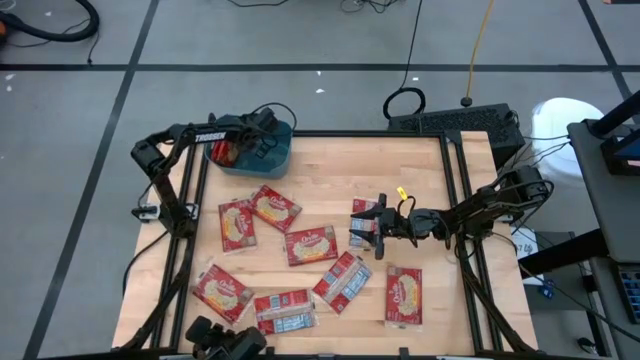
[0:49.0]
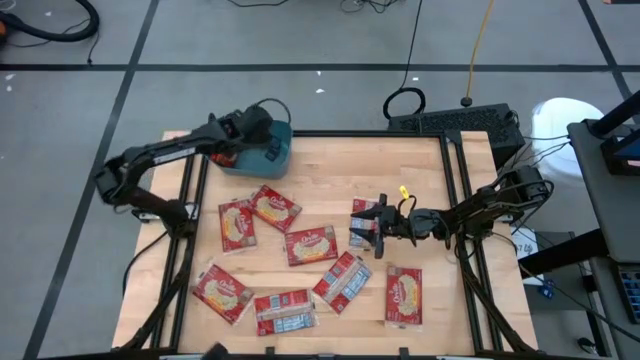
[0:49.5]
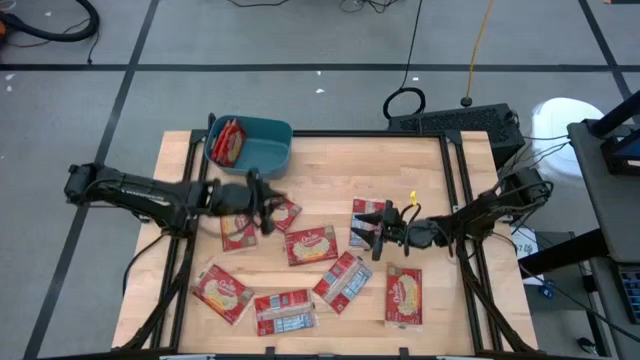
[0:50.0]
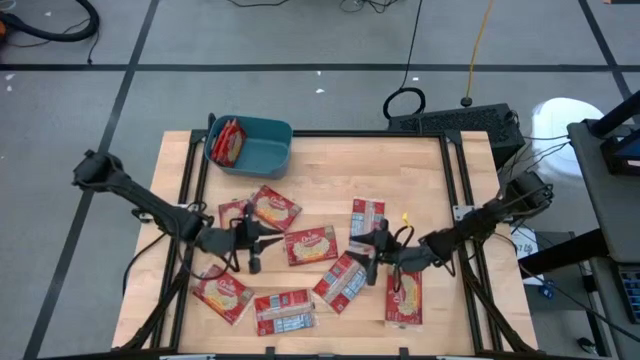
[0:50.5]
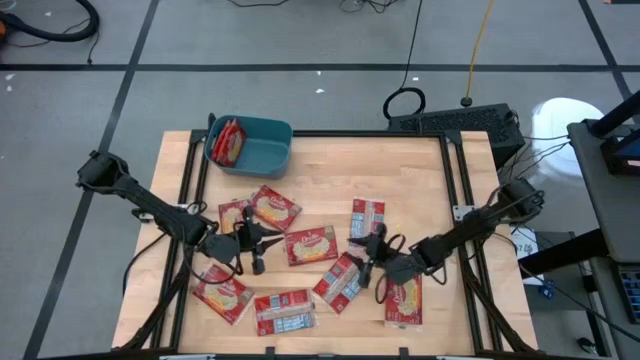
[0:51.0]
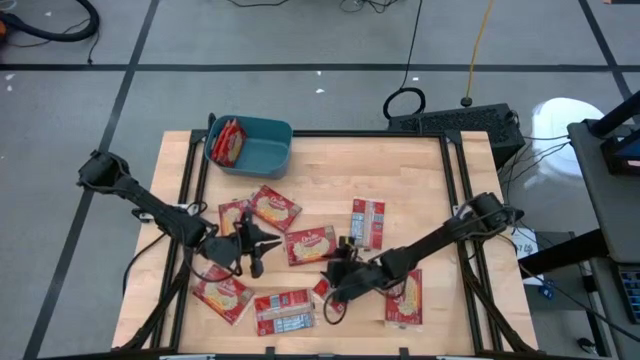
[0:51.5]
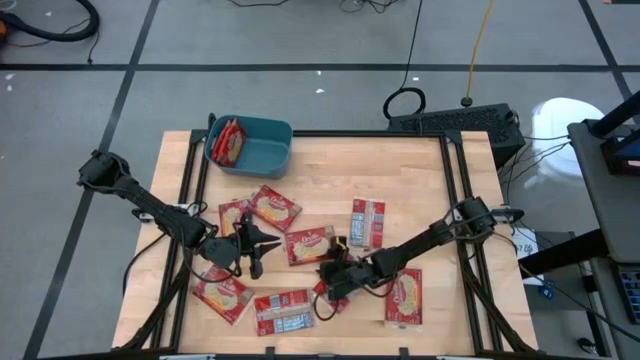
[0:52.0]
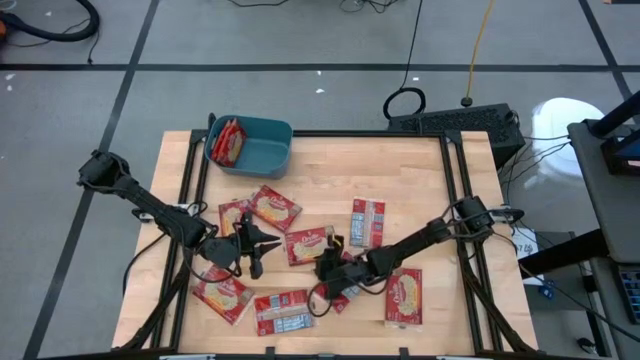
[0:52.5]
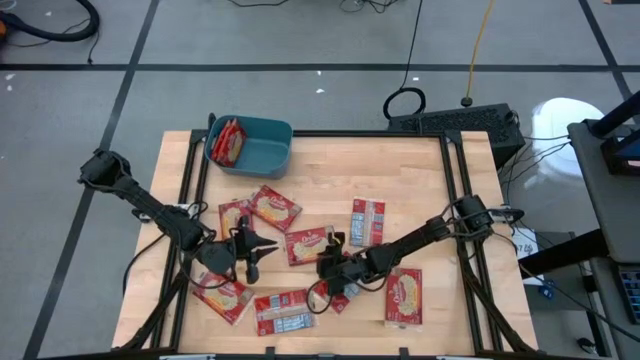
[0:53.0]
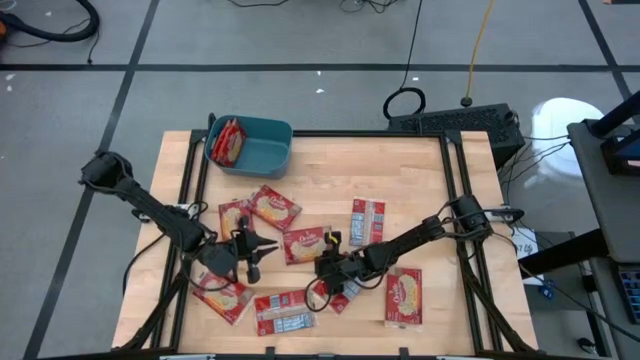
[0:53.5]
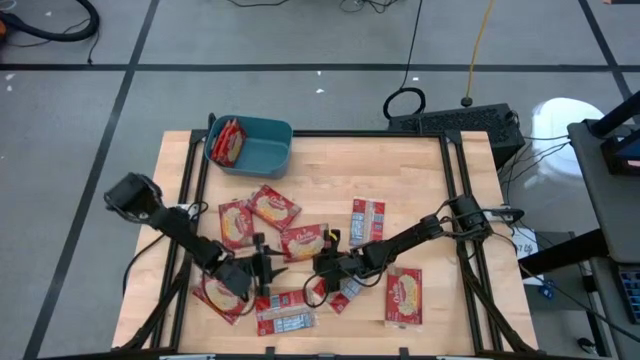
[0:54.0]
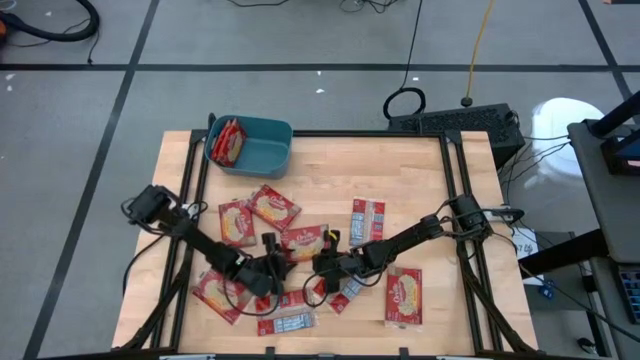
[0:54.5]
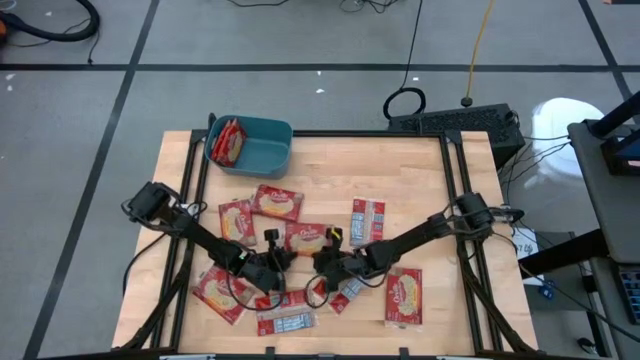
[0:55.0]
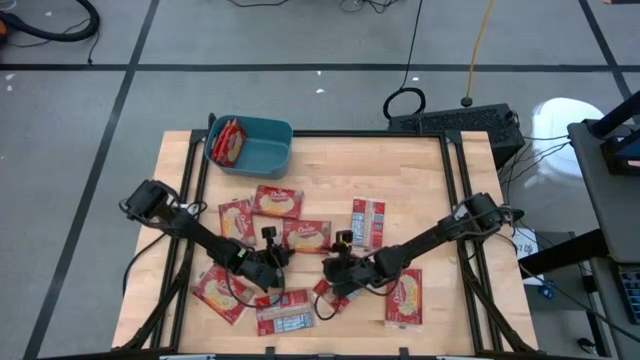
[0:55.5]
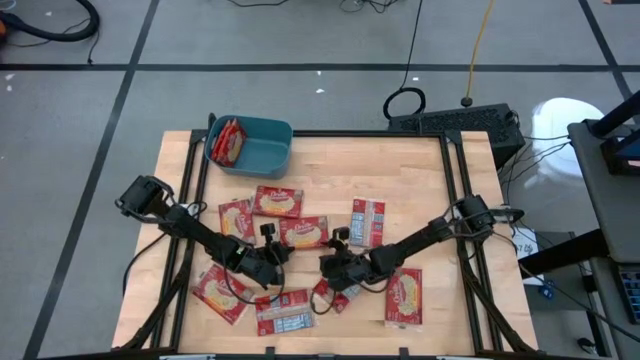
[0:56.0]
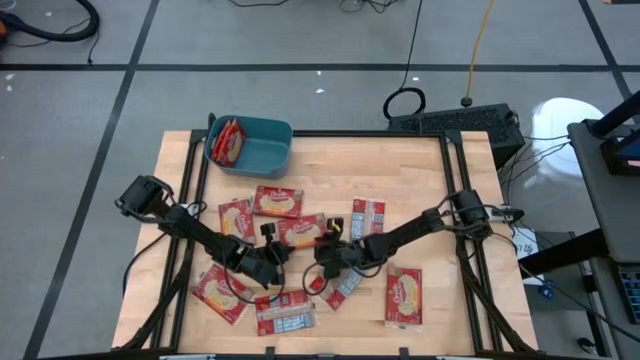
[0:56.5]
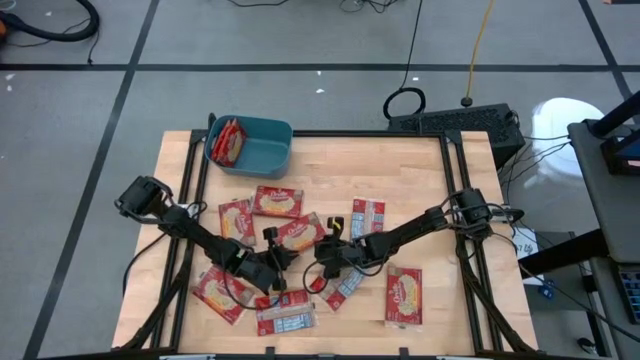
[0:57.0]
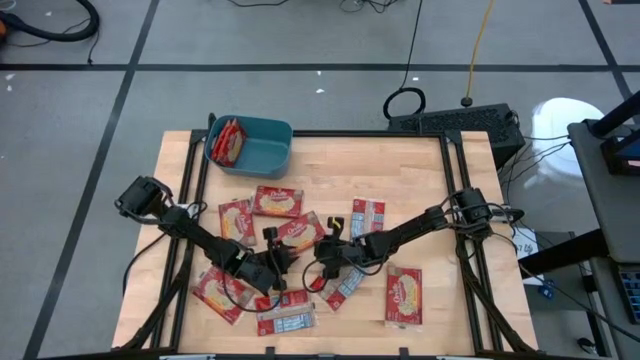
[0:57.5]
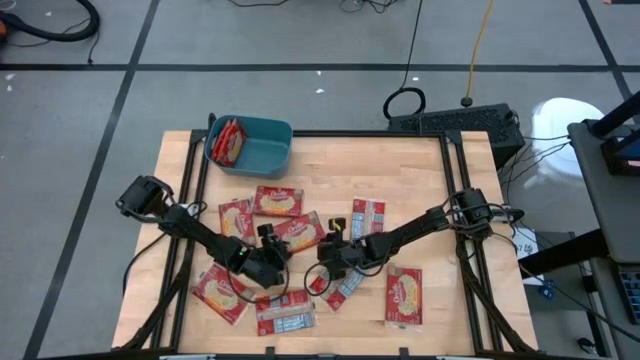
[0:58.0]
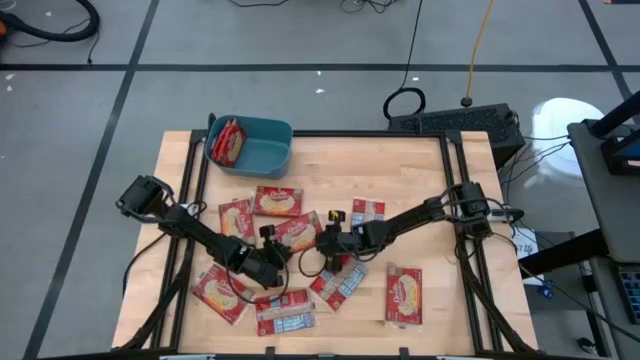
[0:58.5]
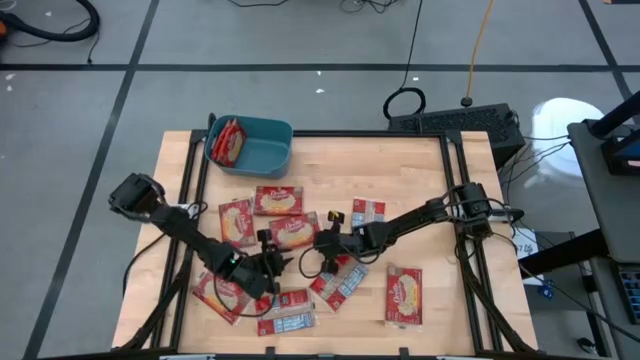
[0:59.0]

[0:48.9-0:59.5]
Task: Sort popcorn bags into baskets
Put the red popcorn bag into the blue bin

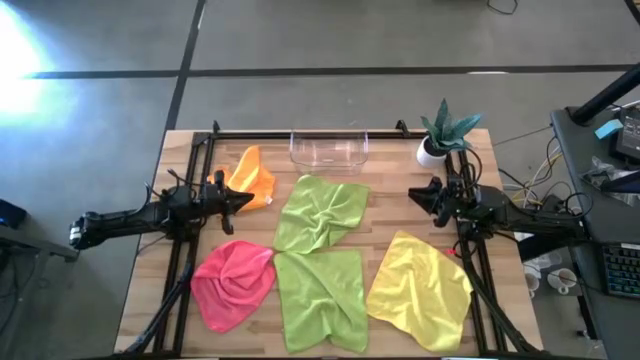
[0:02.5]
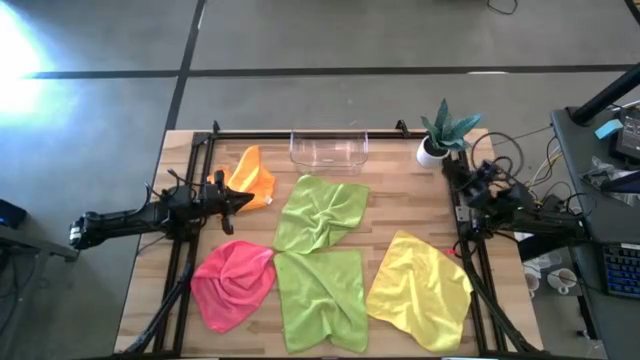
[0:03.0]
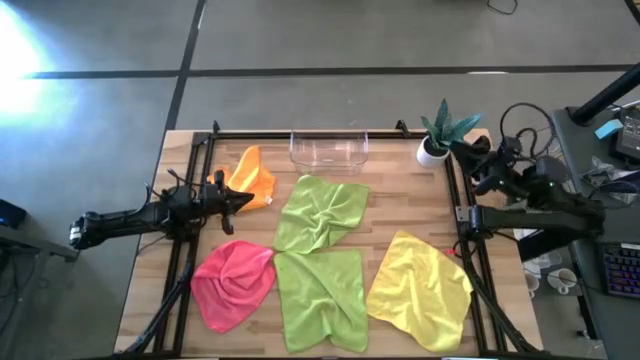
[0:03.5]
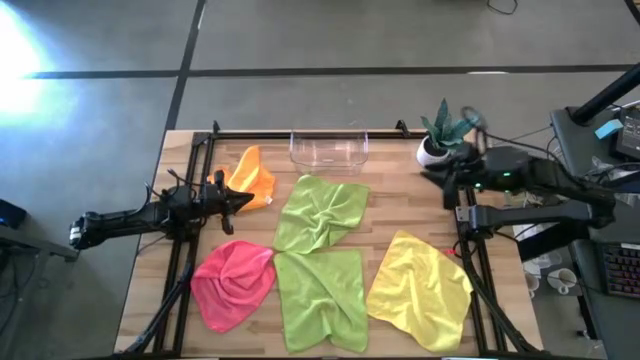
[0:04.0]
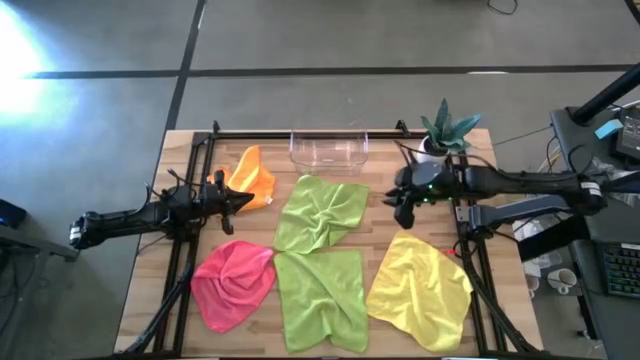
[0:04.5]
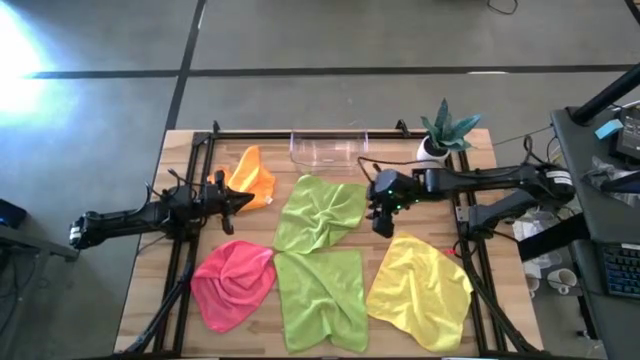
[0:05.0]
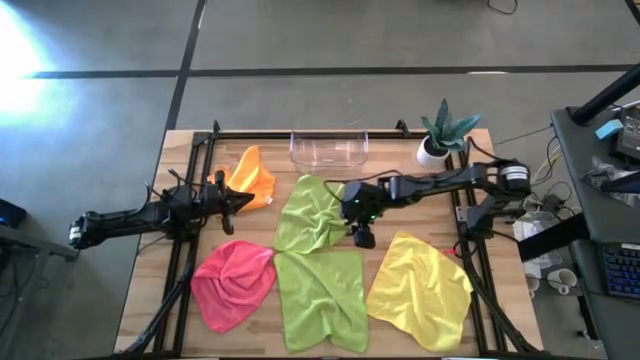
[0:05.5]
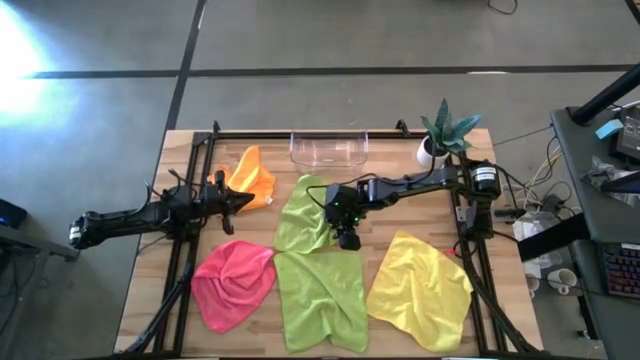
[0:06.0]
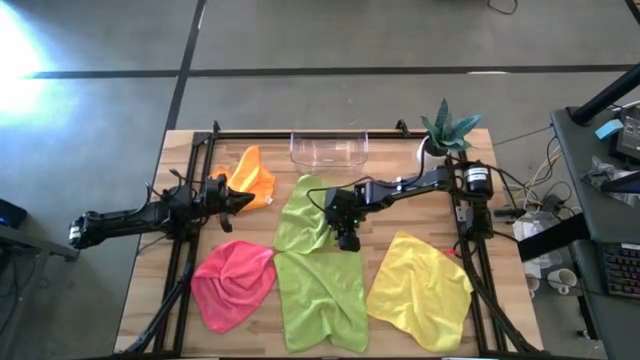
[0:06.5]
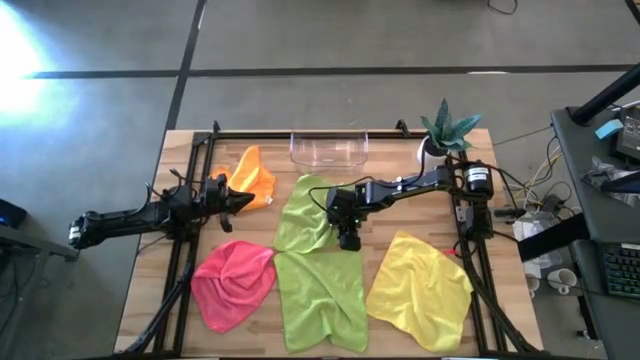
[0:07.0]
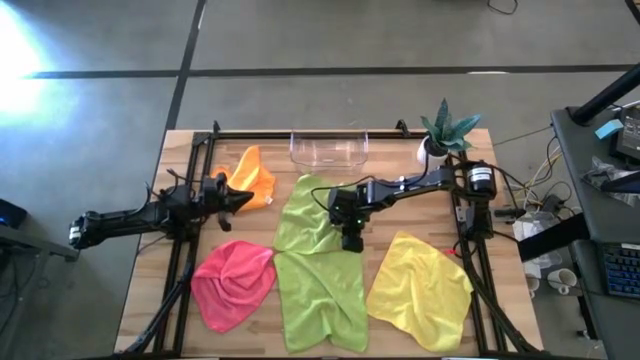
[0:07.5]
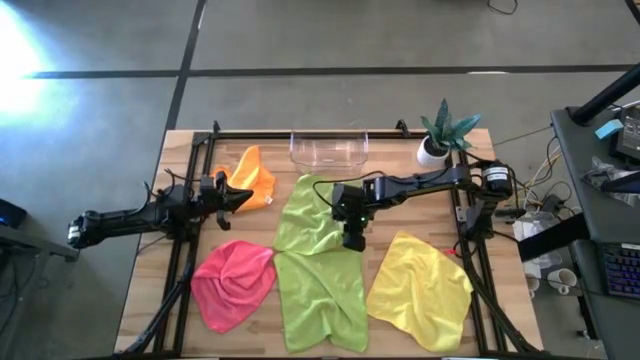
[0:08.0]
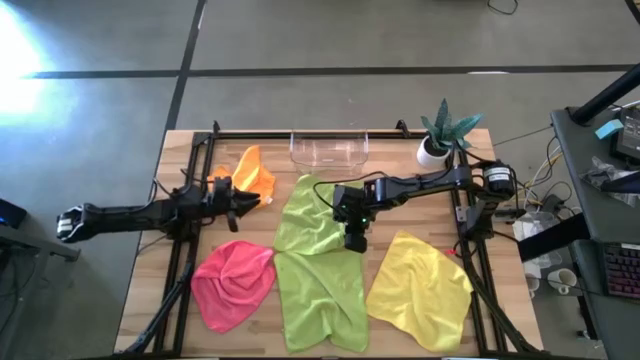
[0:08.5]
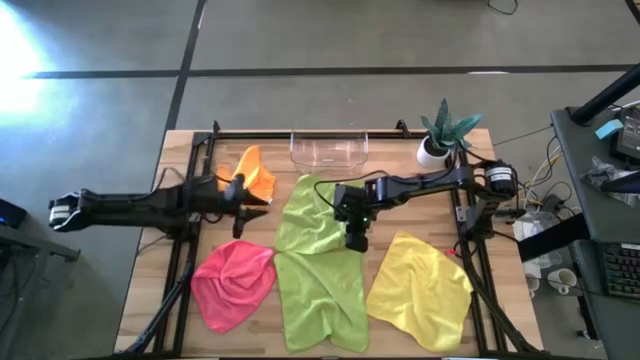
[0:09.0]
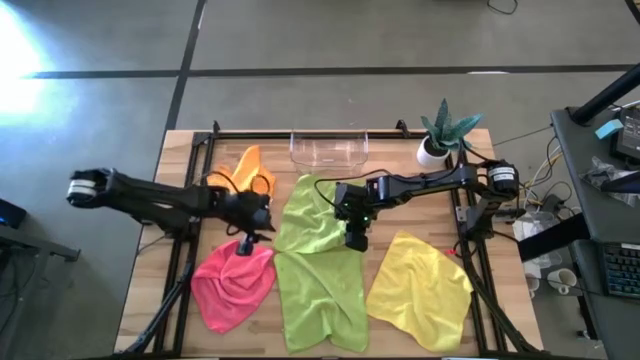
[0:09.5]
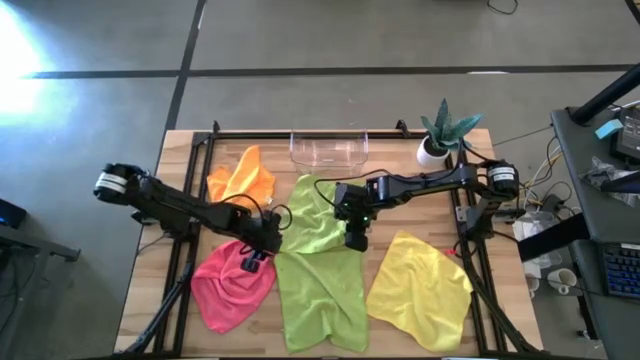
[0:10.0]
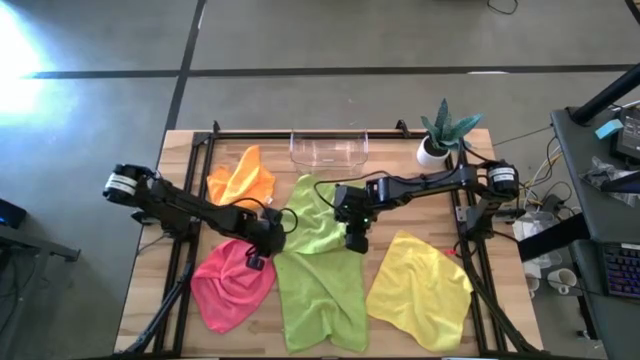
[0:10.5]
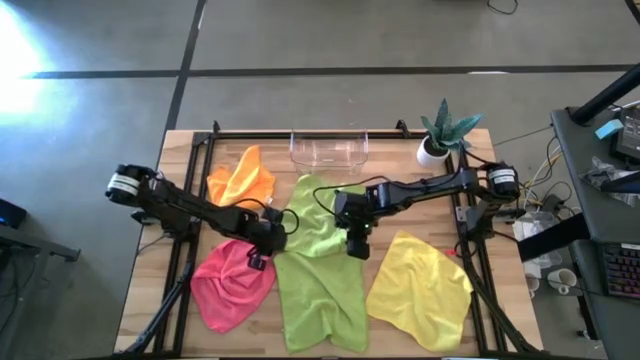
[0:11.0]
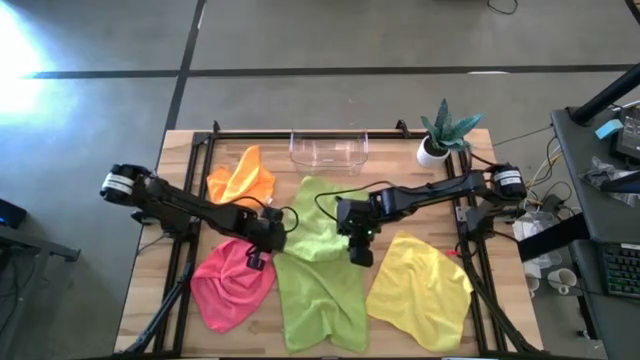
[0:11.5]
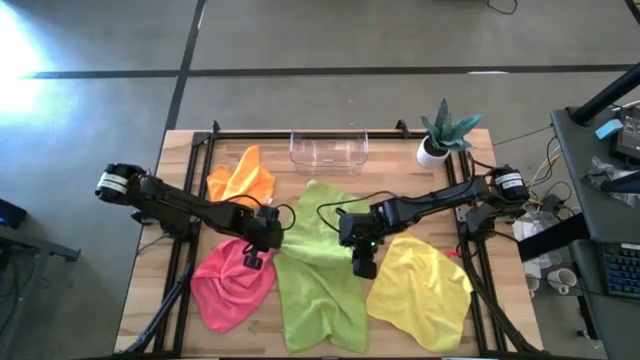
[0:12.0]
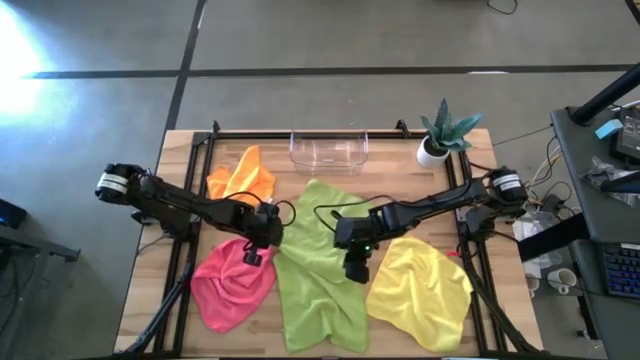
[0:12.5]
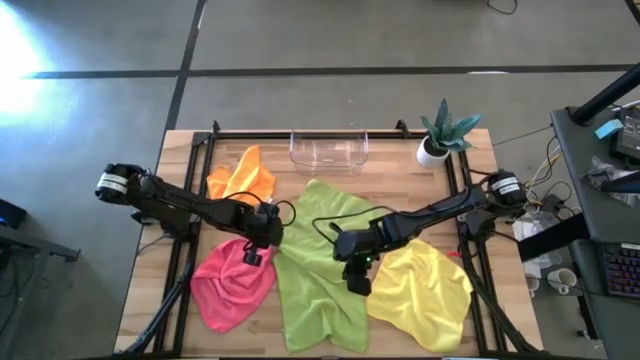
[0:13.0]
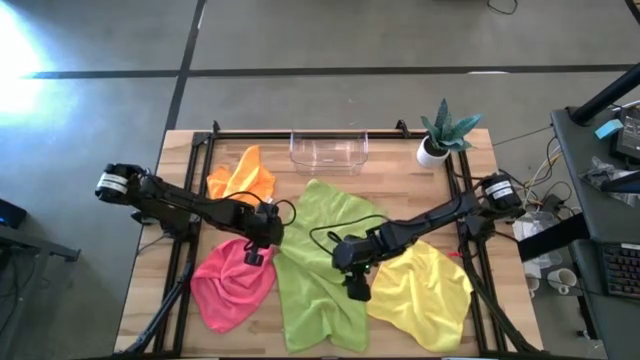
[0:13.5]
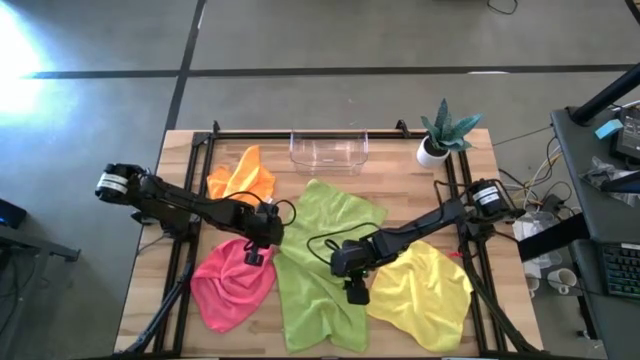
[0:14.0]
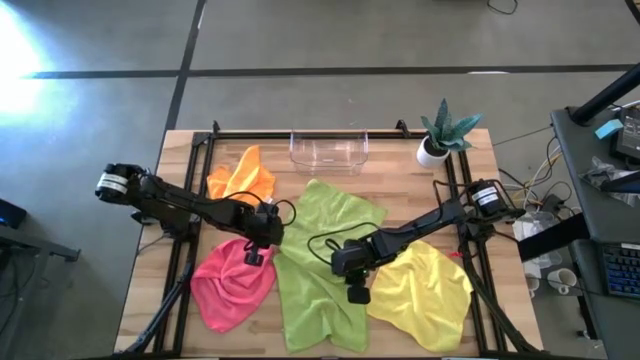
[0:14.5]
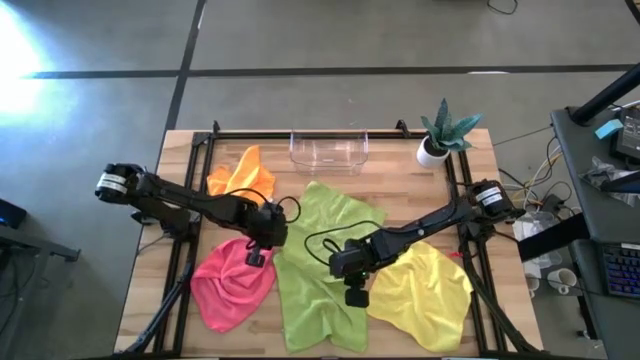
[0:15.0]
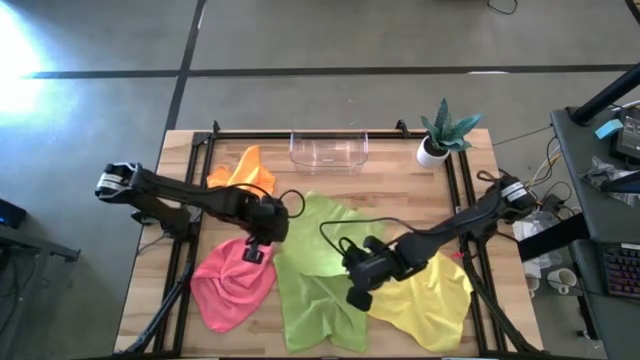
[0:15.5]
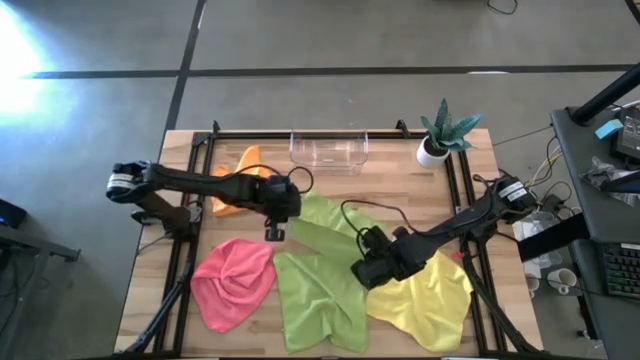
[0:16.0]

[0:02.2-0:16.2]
Task: Fold microfiber towels
Fold the top green microfiber towel on the table
